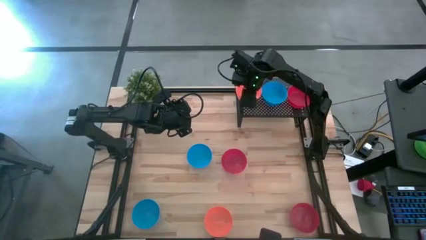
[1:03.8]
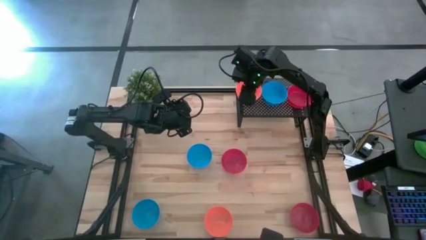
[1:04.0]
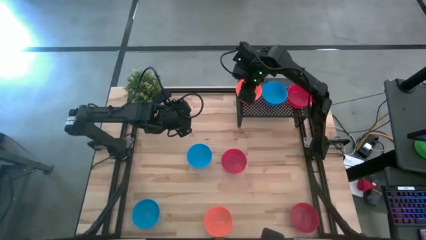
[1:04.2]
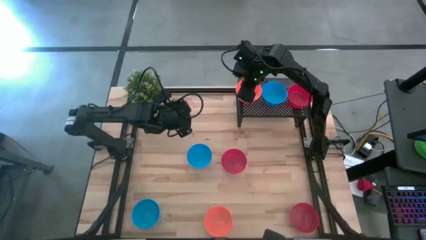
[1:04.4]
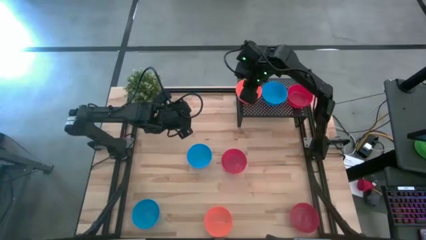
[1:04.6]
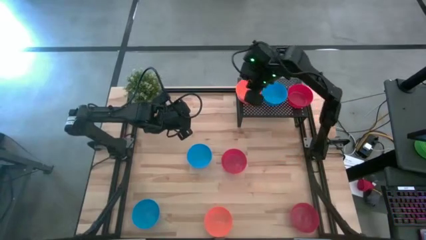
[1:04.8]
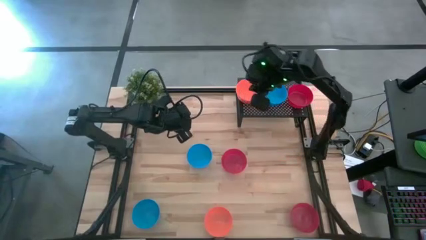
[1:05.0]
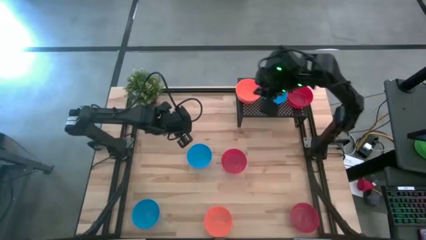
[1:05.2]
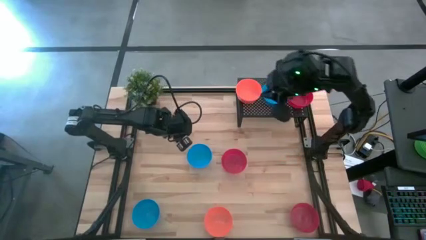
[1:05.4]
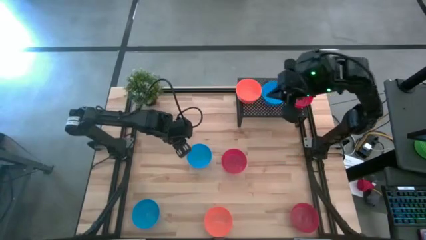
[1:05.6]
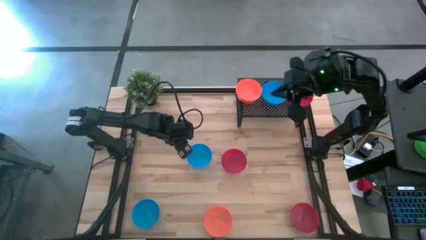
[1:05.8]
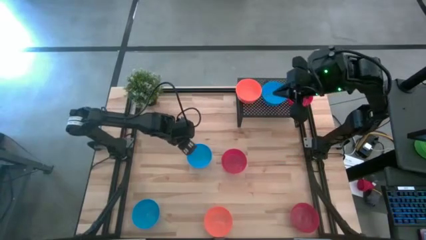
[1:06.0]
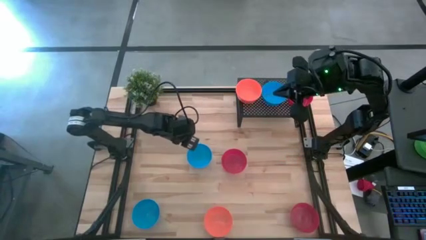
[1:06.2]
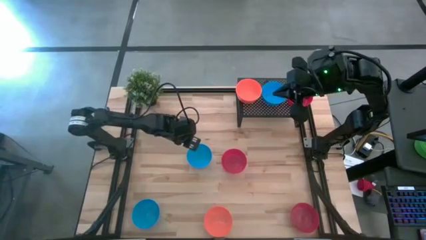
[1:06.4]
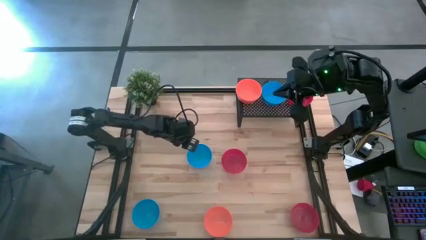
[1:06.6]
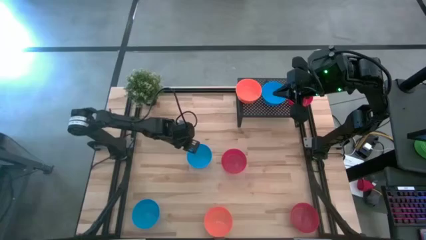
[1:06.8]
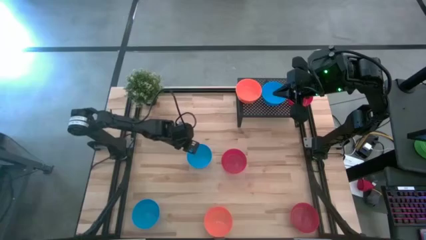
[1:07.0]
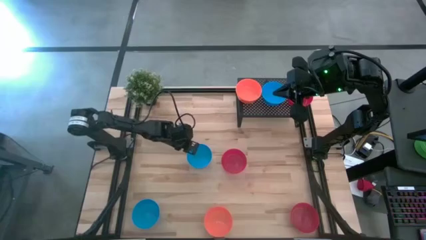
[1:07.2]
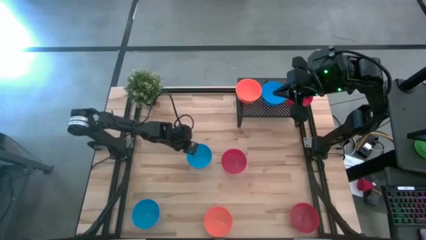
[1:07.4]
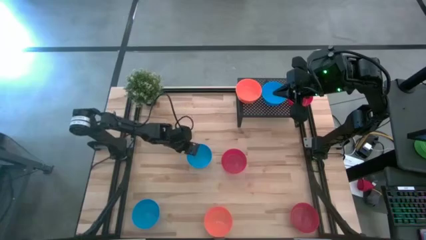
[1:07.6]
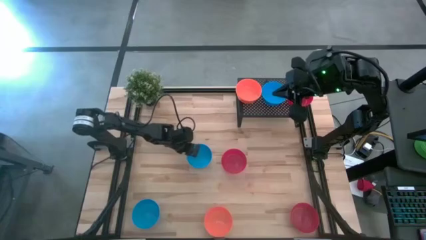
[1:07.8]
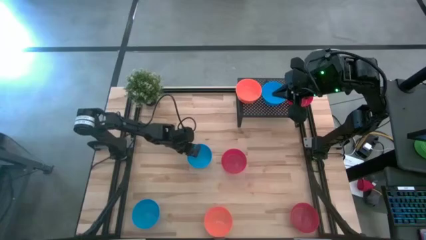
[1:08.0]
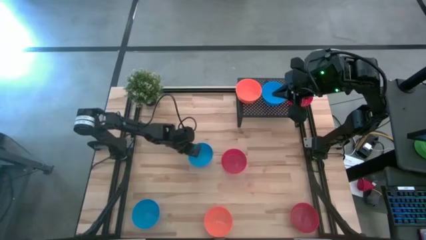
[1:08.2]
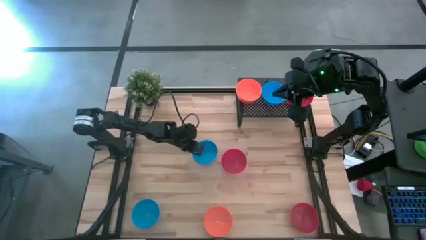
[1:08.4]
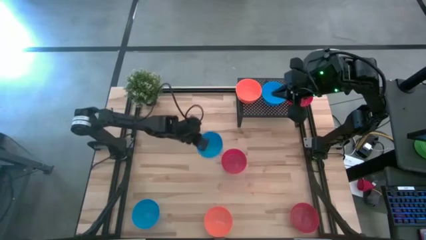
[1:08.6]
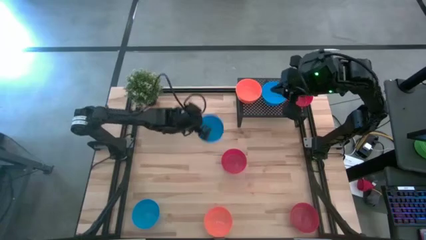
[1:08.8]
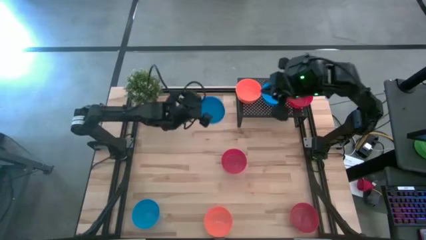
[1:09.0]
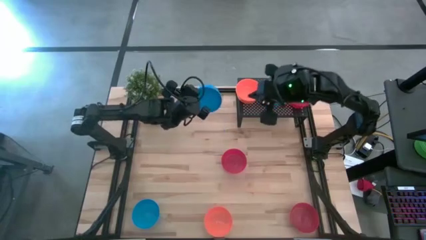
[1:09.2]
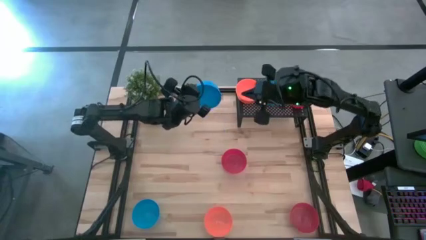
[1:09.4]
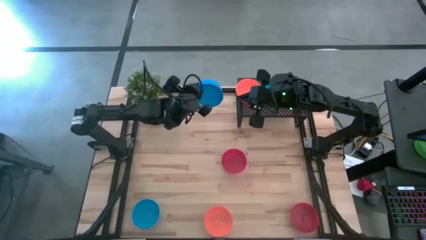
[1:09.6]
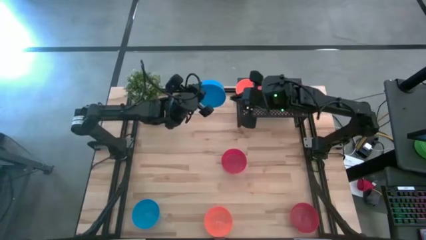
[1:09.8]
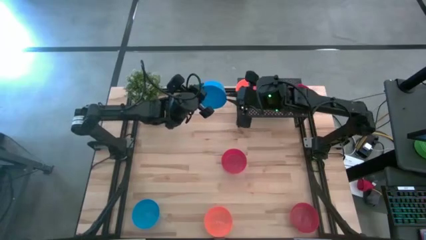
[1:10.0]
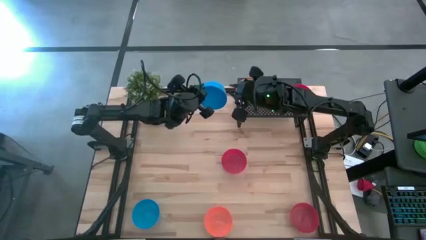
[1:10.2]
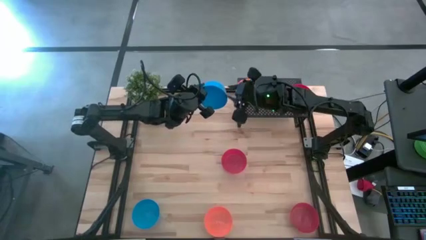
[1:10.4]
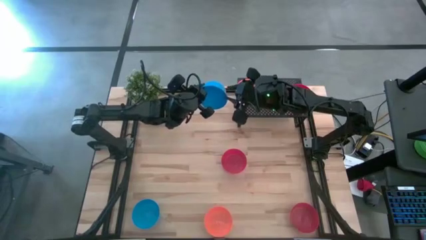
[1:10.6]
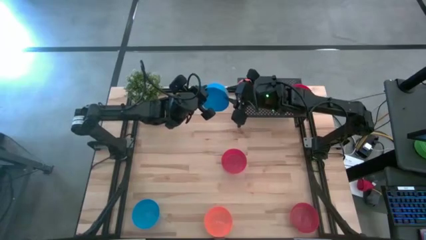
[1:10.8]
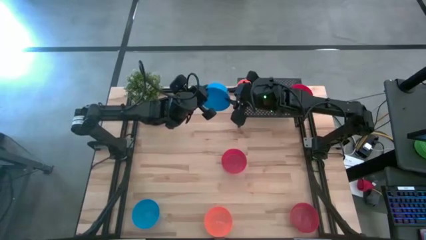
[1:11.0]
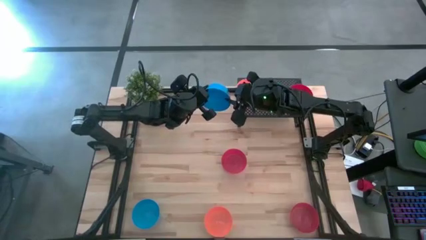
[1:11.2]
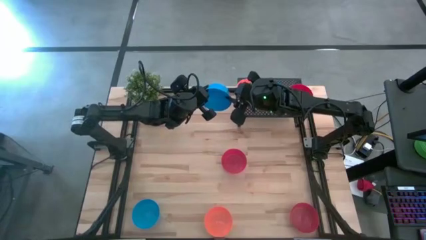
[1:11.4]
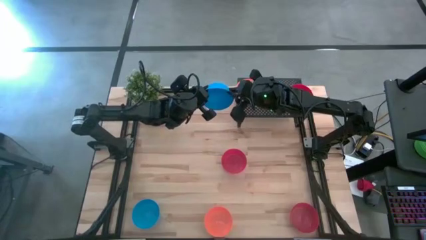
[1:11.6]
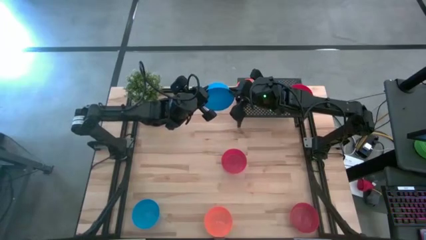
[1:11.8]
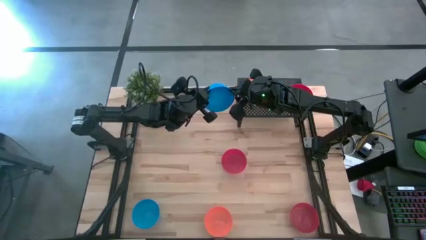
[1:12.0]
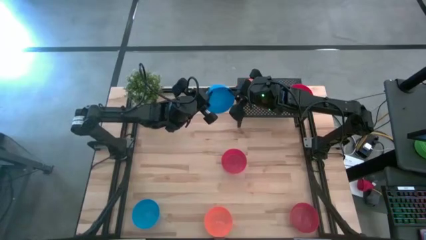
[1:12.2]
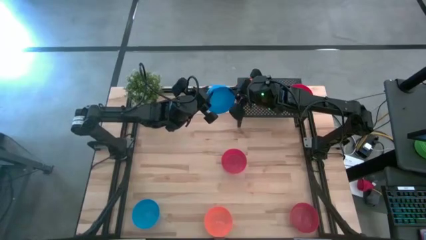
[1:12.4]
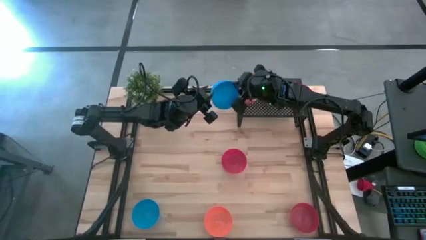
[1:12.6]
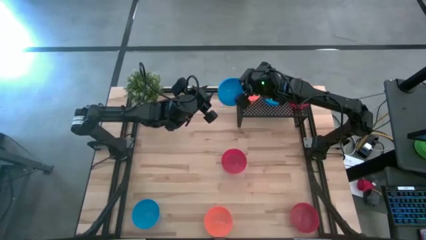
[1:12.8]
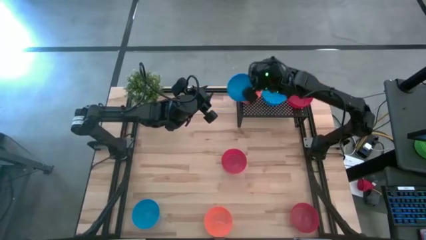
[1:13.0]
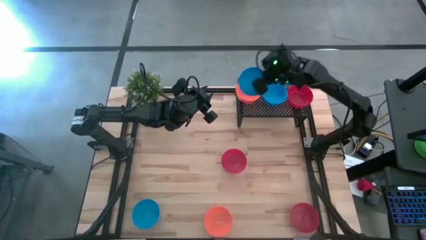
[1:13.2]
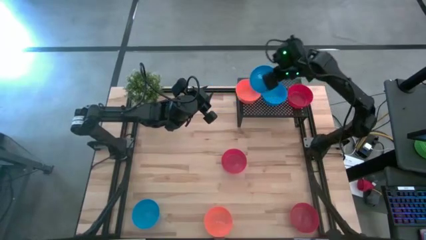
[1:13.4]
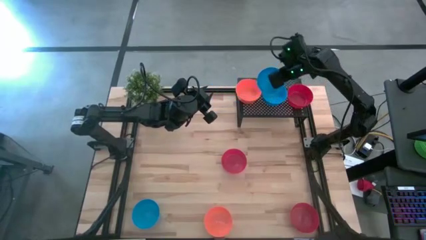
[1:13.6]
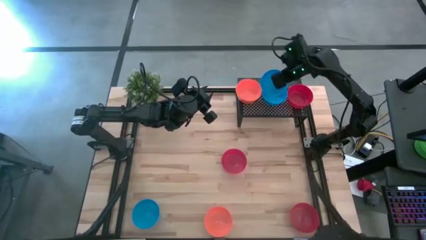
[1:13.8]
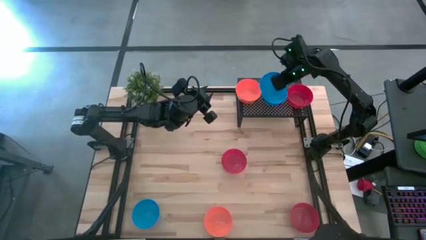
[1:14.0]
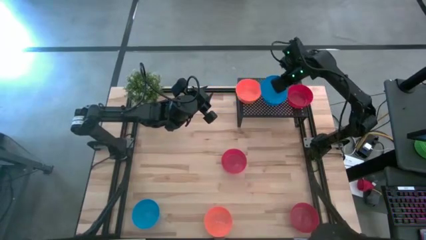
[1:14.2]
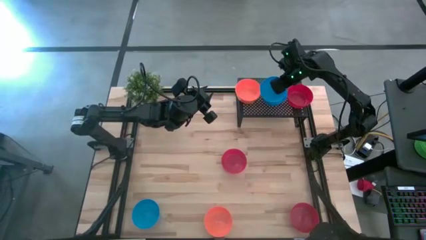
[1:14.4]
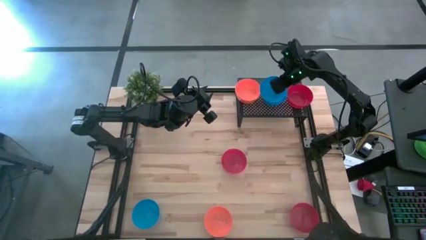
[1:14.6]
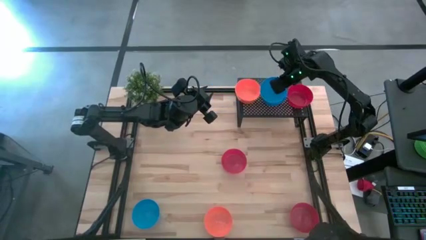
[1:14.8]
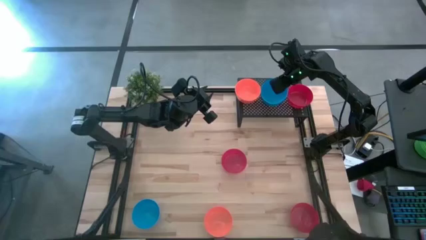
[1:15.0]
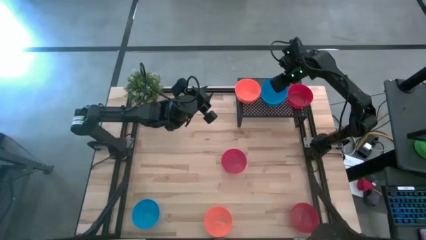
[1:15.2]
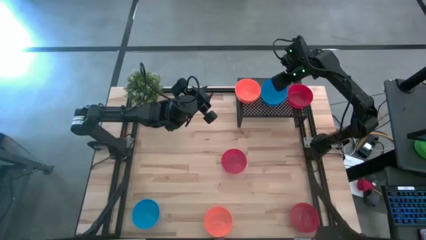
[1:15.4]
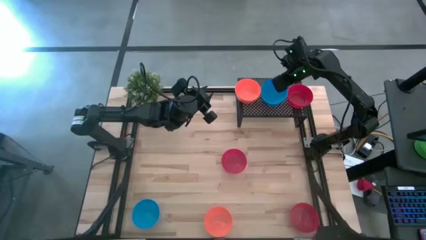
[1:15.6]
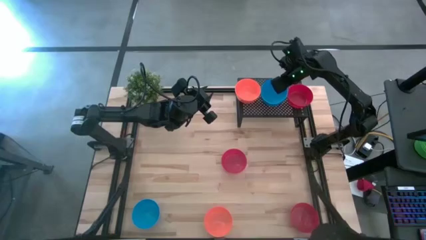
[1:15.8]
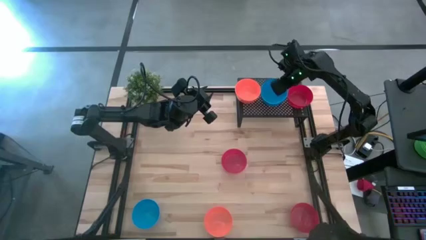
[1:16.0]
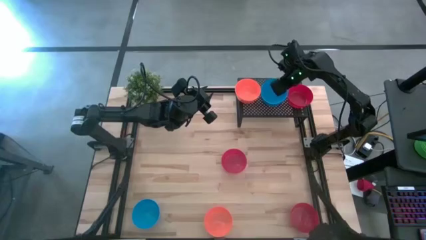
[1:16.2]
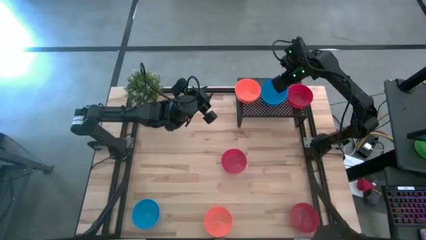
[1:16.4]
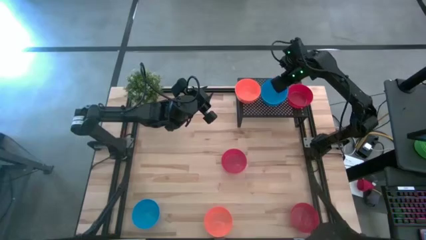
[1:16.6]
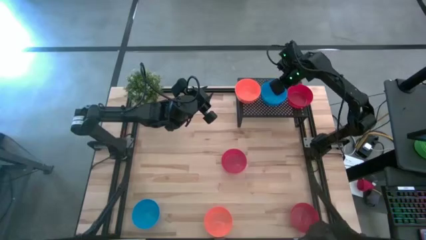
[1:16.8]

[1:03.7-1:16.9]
Task: Pick & Place Mini bowls
Stack the right blue bowl on top of the blue bowl on the shelf
